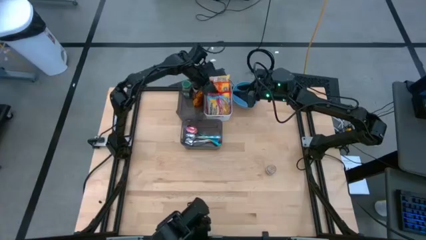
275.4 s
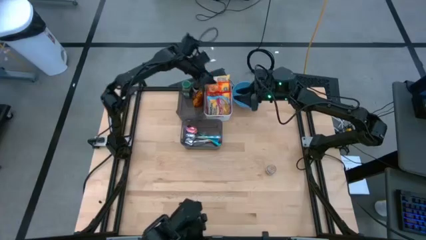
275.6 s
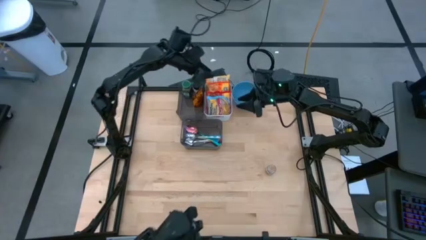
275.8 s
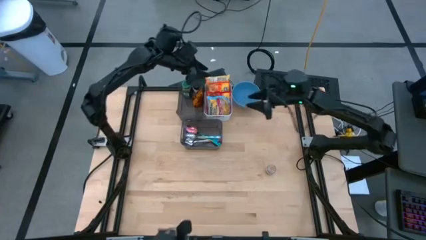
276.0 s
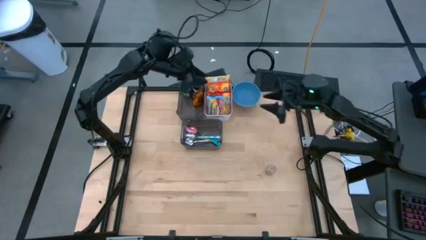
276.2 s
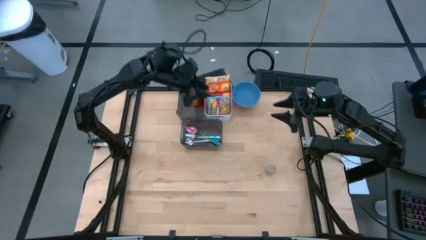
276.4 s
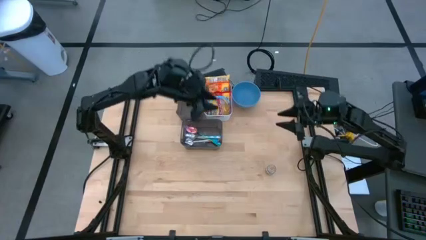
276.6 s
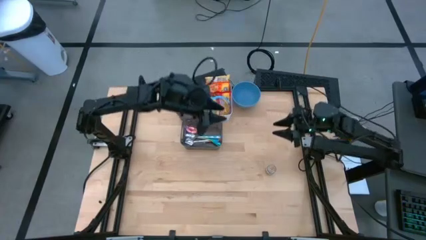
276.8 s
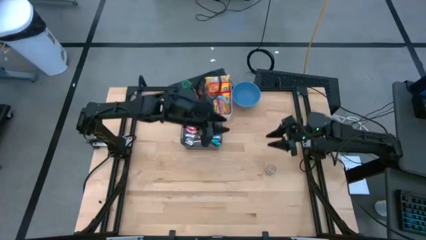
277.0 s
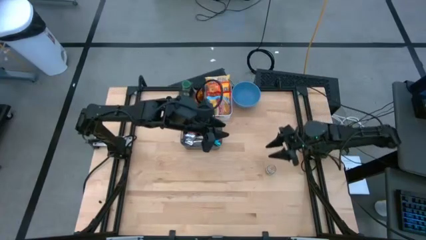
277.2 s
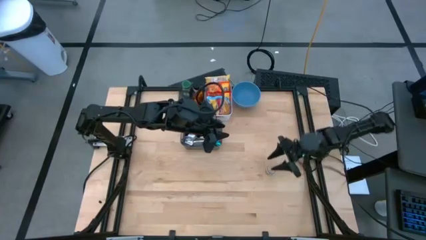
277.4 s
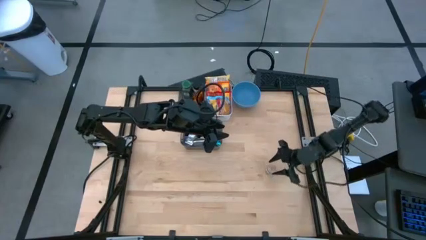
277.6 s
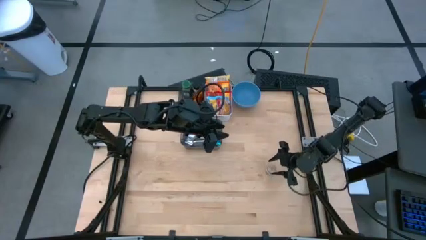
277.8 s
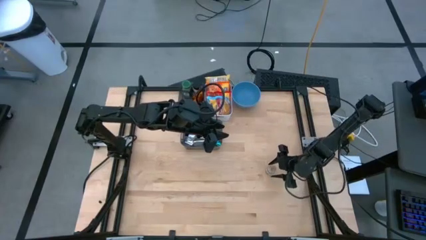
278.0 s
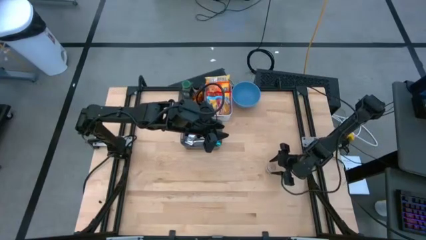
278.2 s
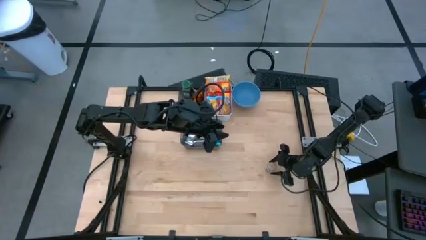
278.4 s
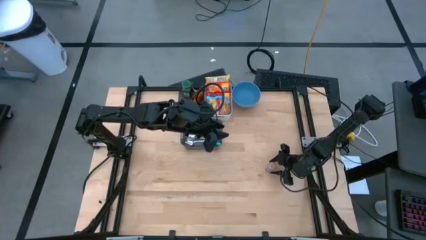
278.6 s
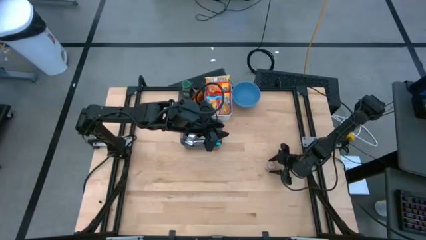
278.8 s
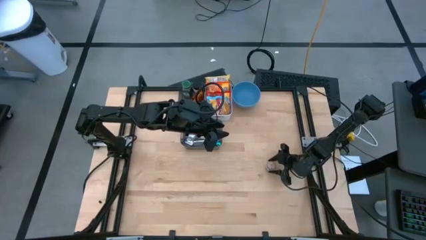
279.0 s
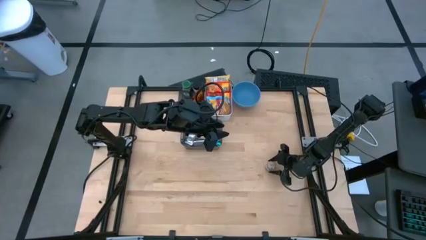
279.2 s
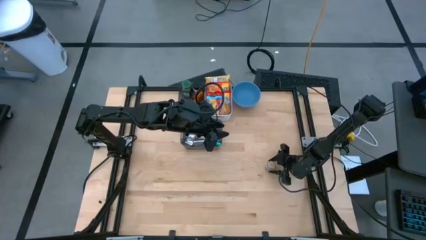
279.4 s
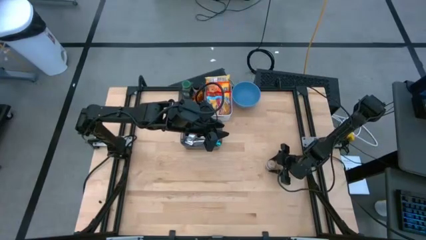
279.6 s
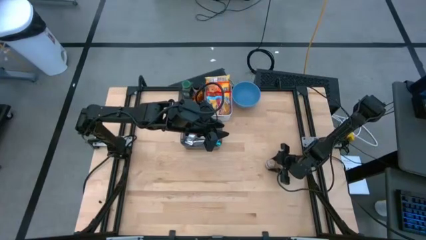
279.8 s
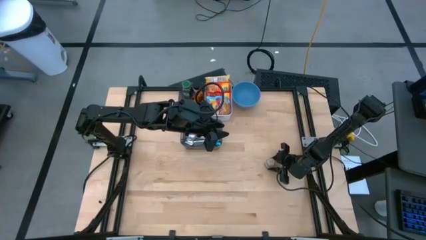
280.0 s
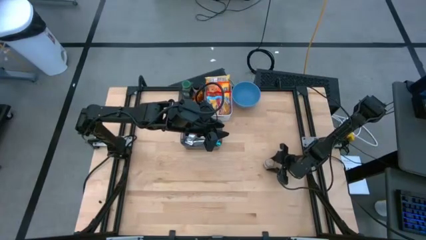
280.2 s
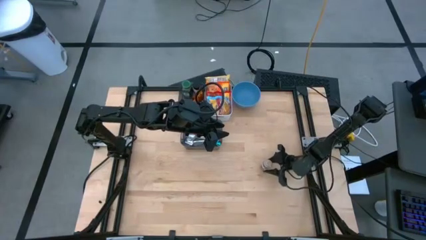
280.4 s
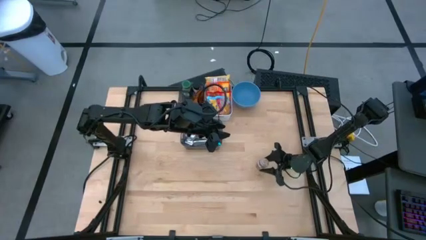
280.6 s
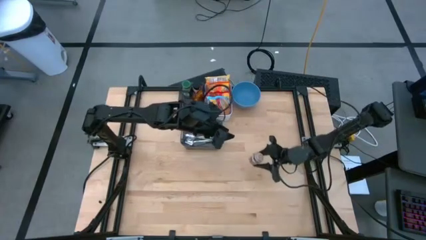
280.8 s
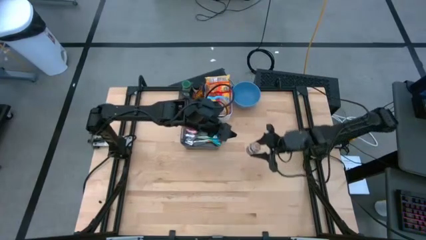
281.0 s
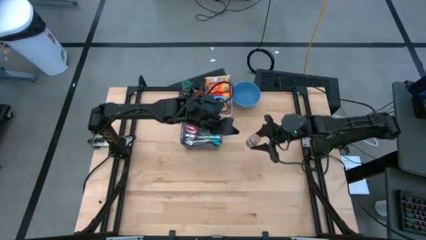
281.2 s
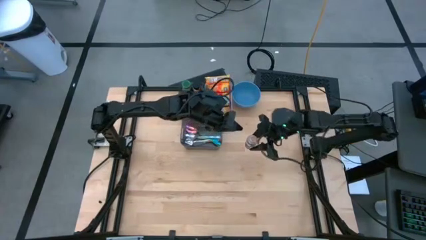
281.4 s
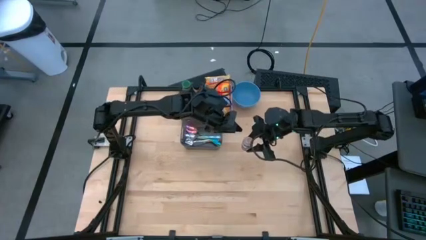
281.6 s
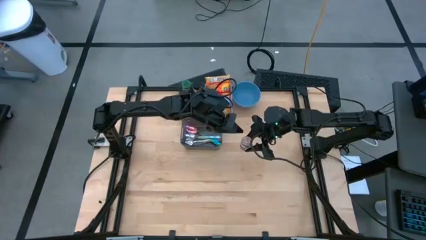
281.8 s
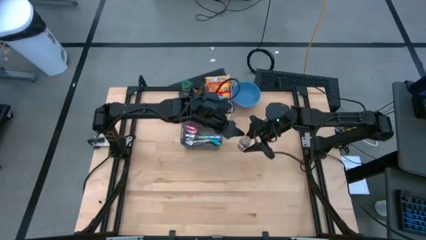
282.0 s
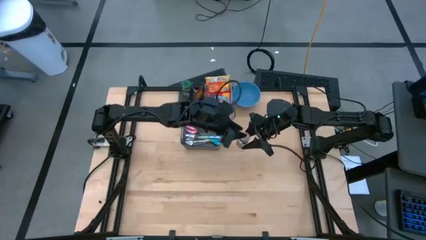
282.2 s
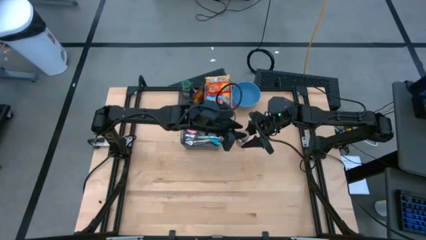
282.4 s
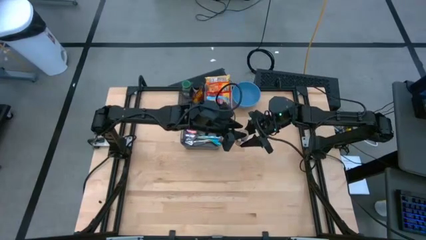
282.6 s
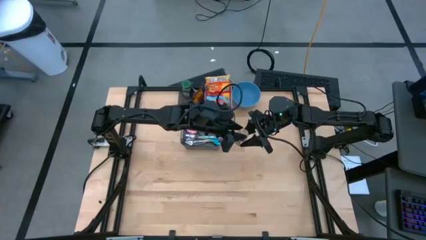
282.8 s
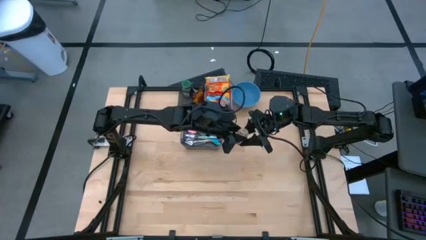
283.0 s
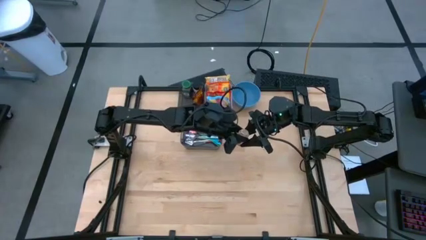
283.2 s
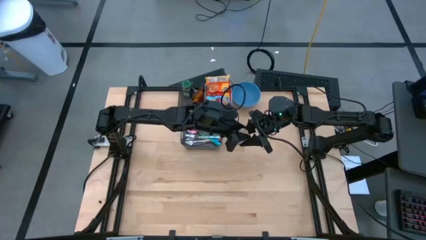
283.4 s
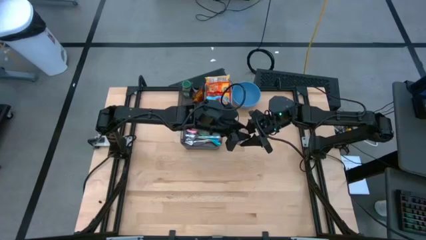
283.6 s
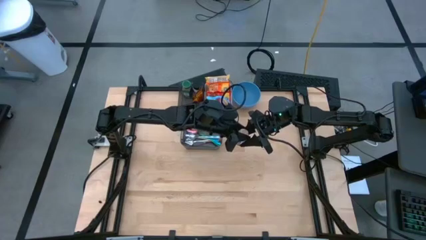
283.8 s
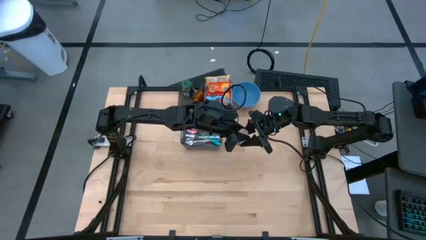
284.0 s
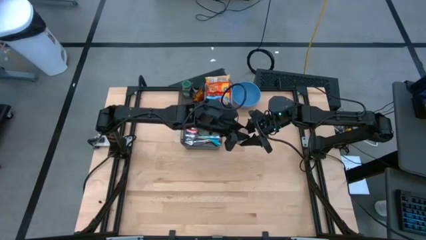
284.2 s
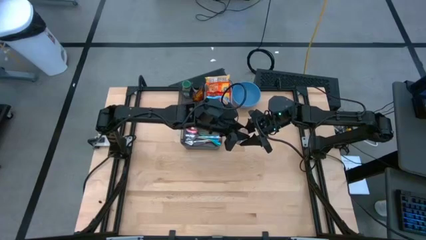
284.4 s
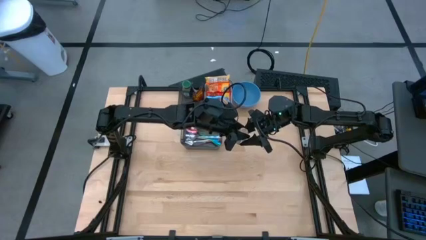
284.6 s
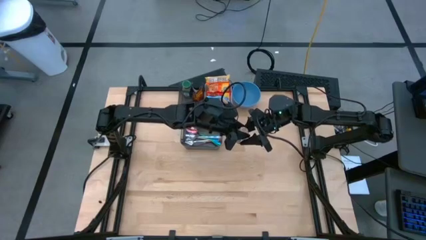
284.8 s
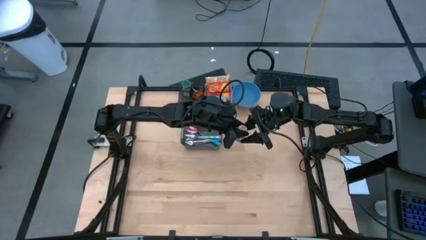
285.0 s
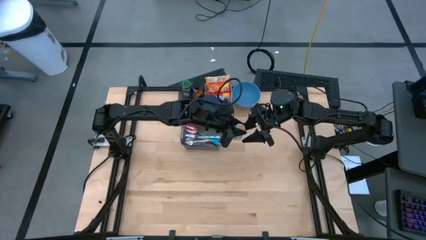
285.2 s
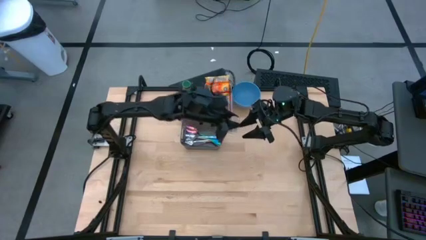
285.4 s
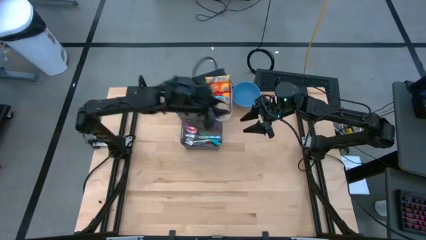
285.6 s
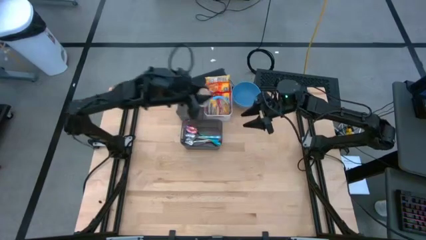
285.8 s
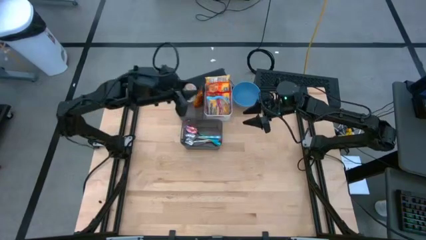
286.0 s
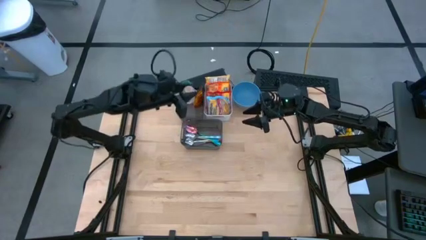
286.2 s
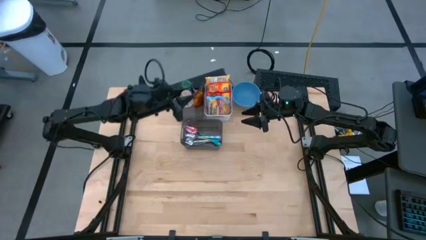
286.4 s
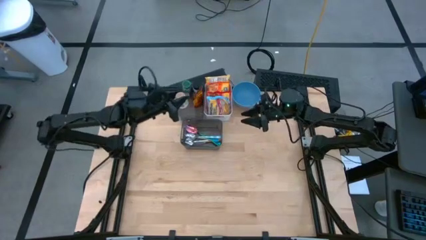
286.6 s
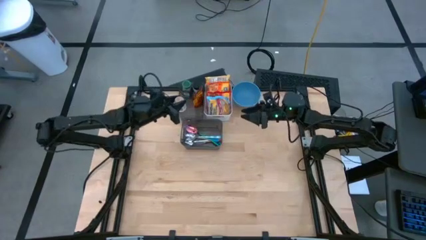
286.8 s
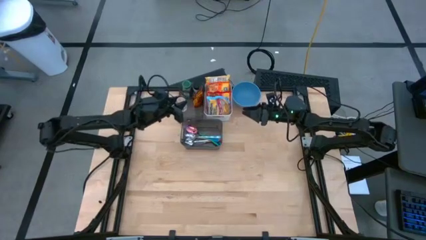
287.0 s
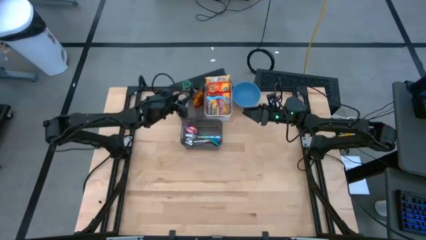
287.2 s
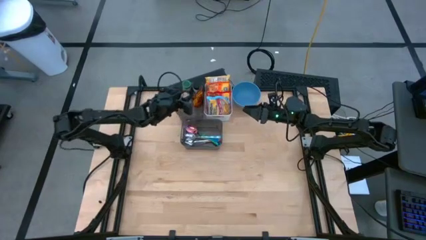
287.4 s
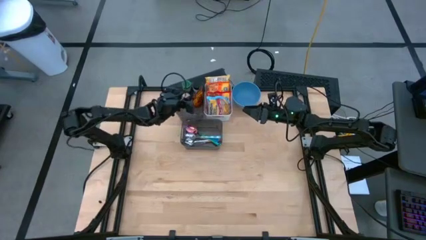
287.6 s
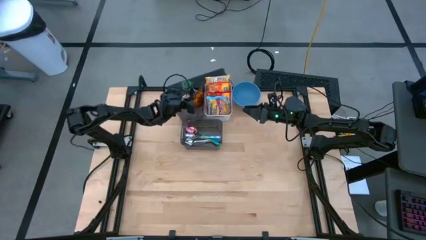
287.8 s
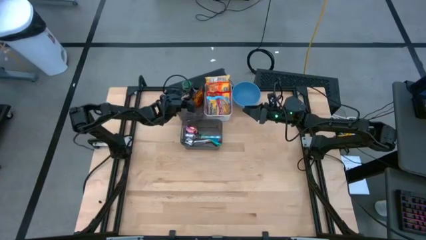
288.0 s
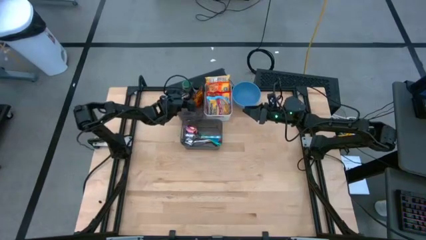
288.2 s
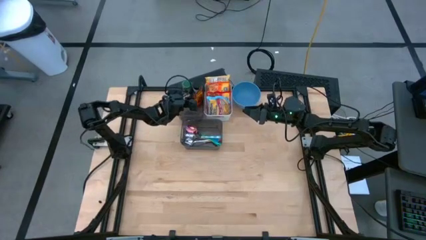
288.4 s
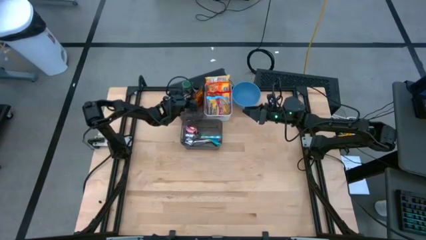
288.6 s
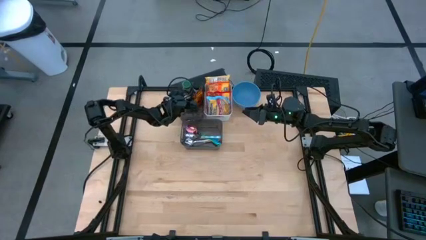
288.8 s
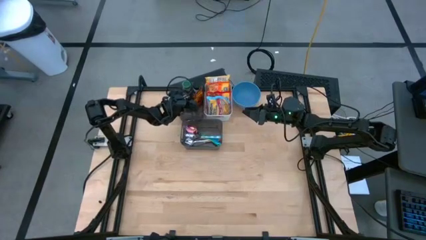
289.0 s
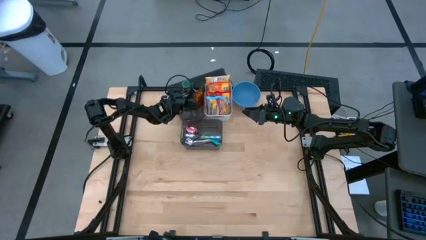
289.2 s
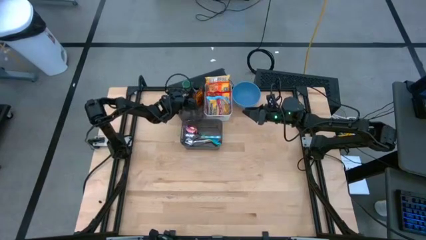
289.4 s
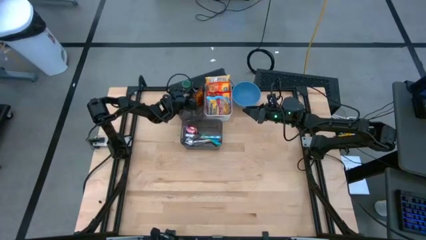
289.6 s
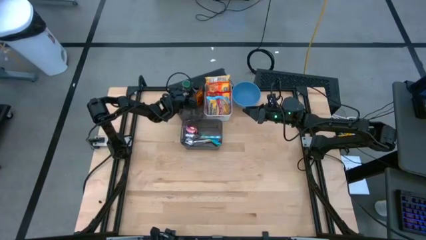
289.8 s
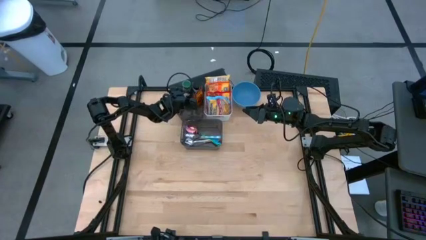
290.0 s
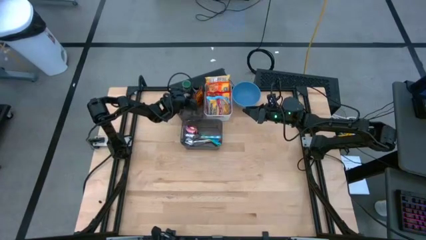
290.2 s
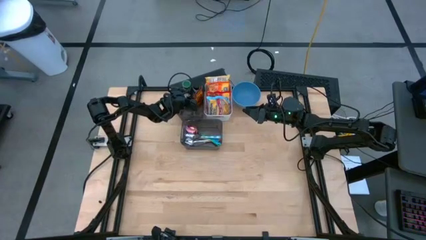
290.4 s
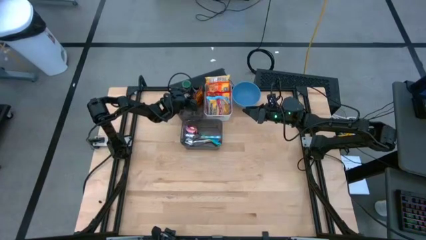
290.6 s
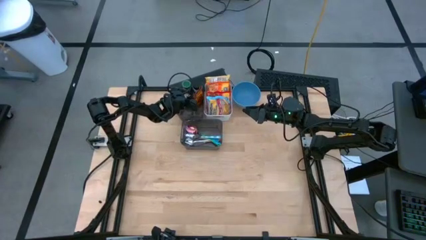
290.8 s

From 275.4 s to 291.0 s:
Task: Pick & Place Food Item
Put the brown seasoning bottle into the top black bin
